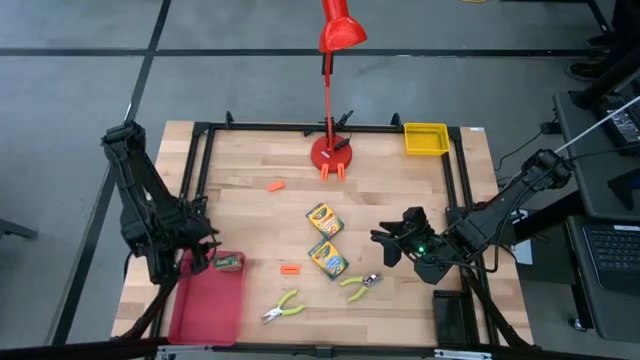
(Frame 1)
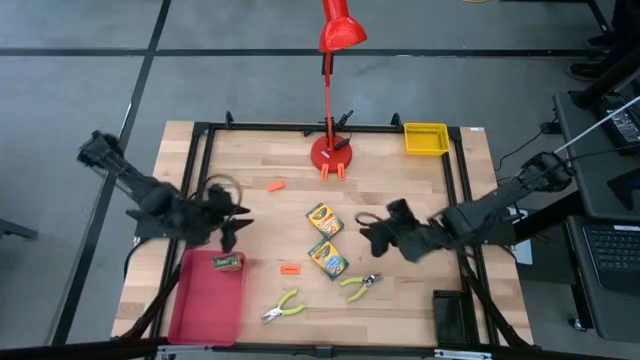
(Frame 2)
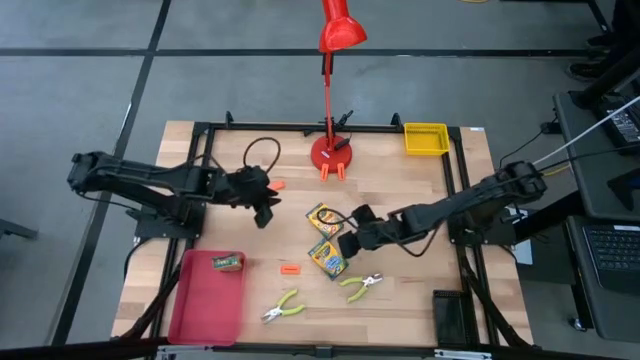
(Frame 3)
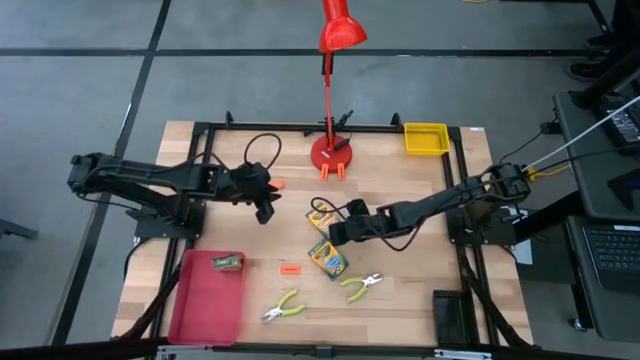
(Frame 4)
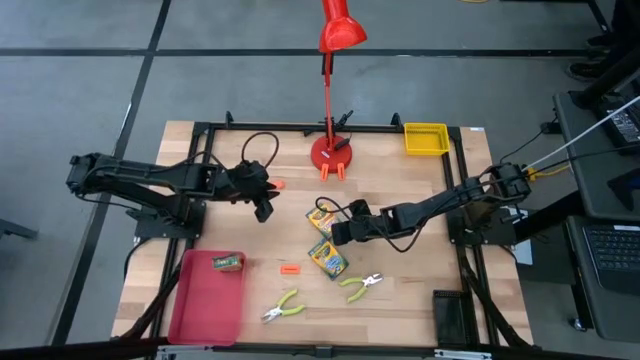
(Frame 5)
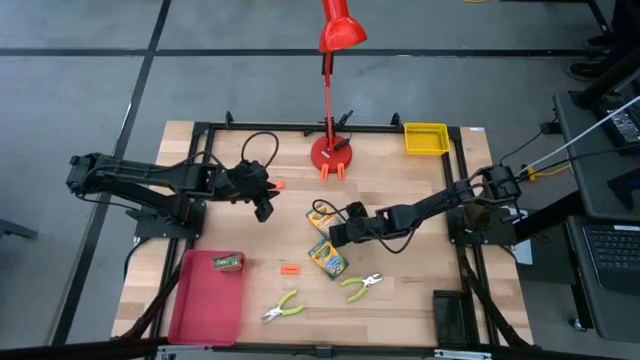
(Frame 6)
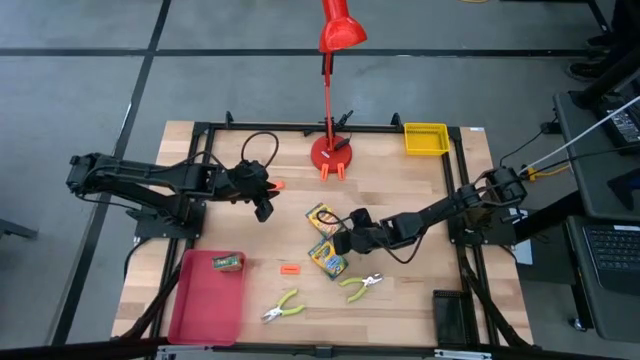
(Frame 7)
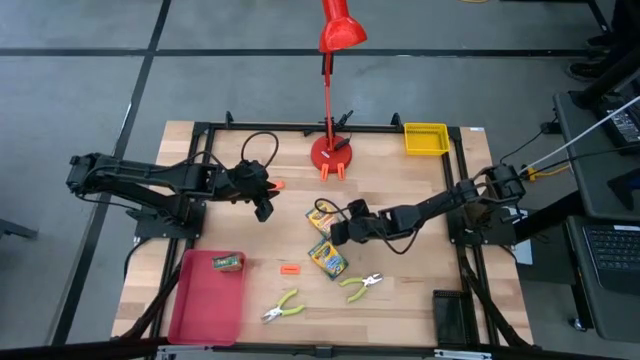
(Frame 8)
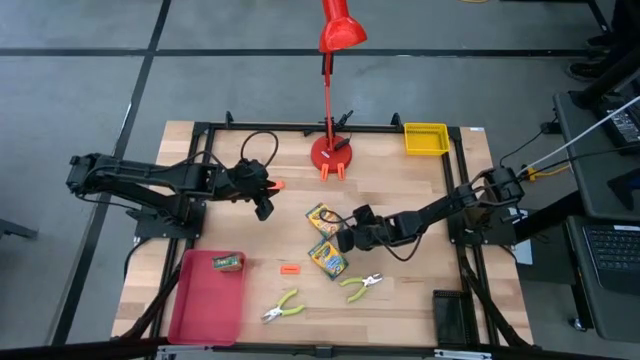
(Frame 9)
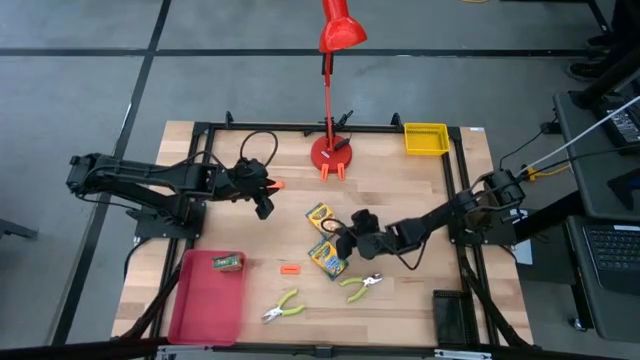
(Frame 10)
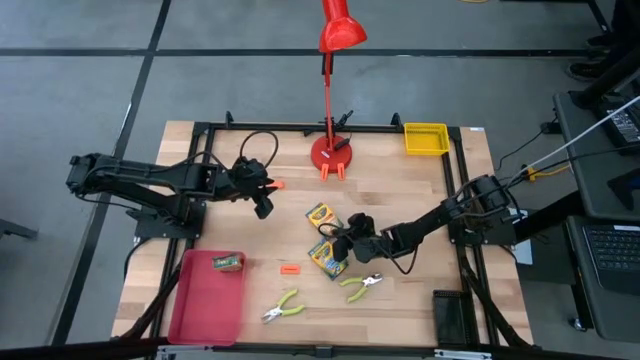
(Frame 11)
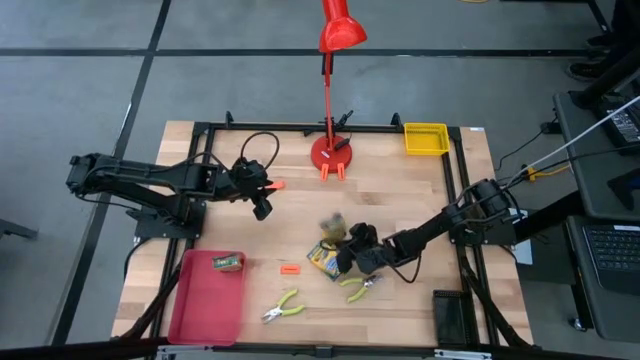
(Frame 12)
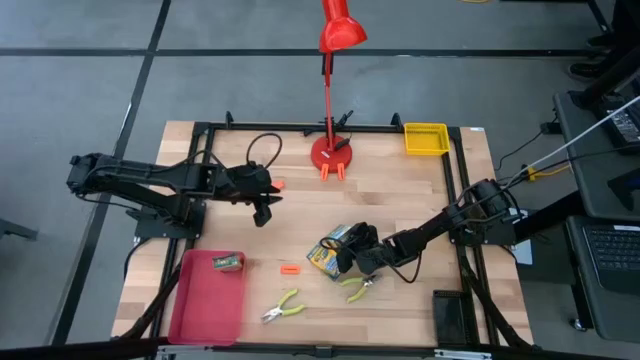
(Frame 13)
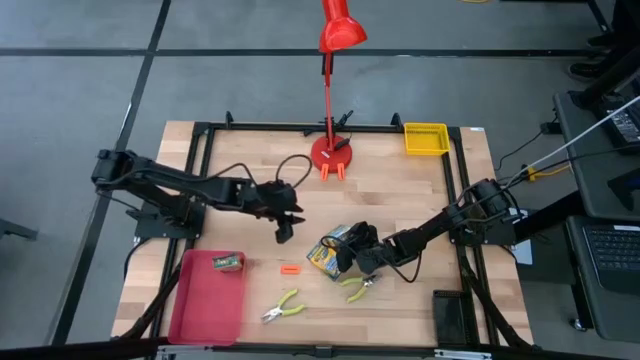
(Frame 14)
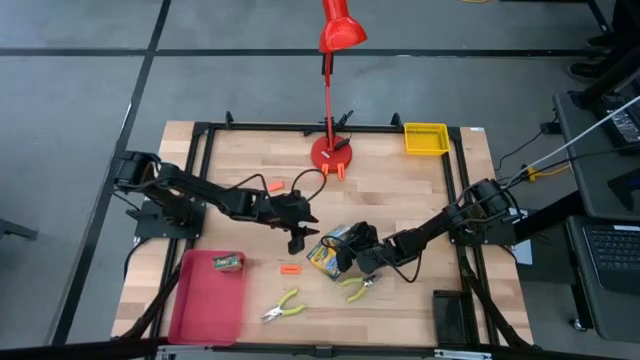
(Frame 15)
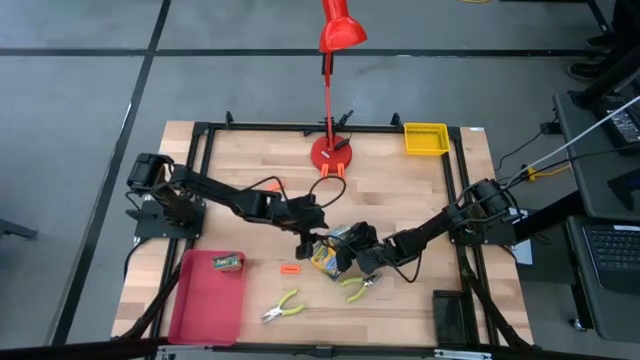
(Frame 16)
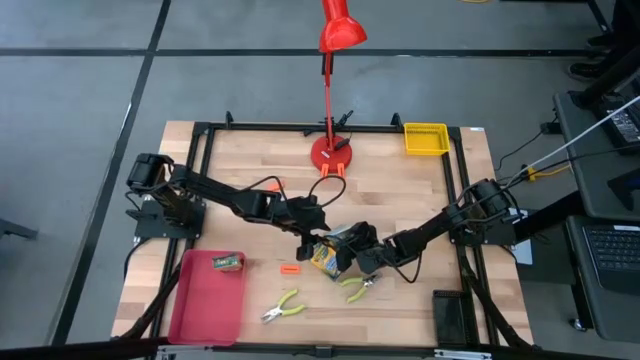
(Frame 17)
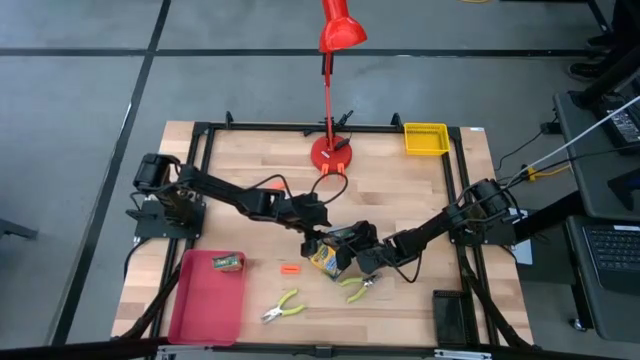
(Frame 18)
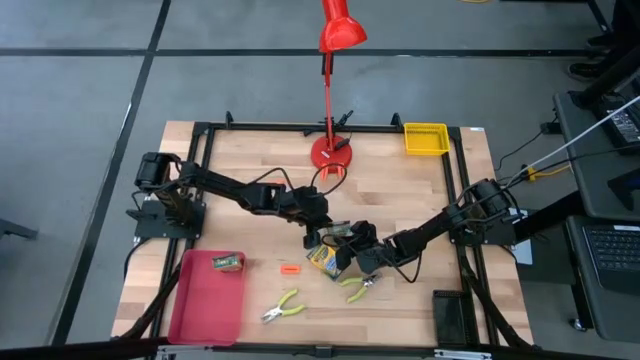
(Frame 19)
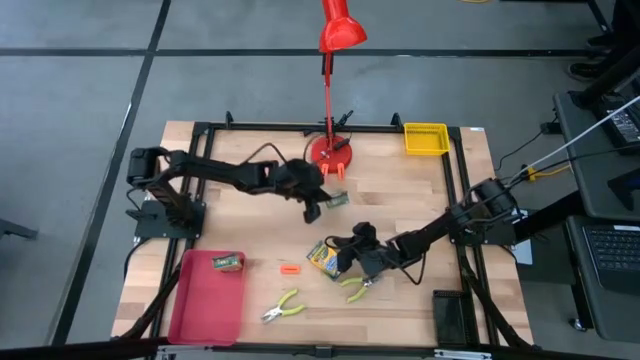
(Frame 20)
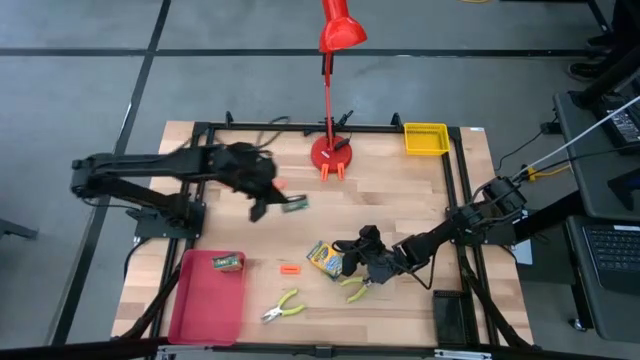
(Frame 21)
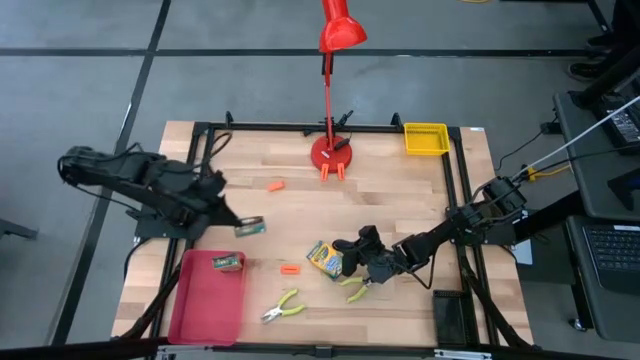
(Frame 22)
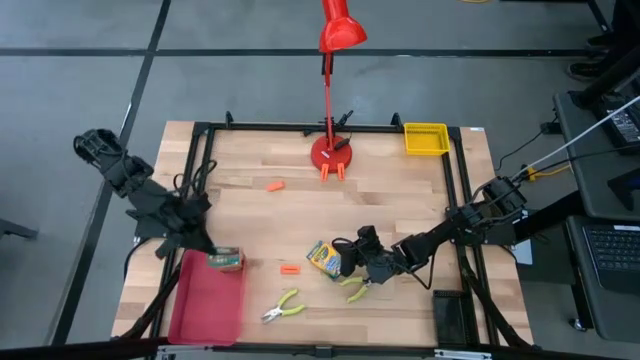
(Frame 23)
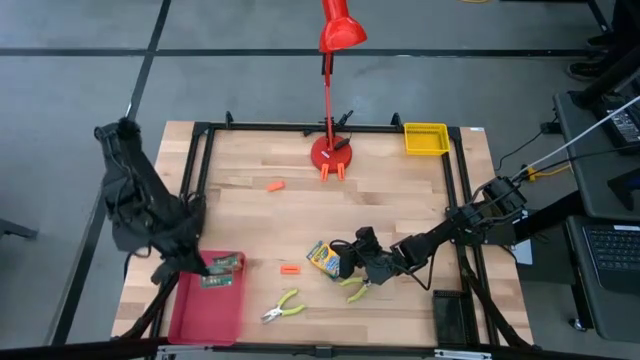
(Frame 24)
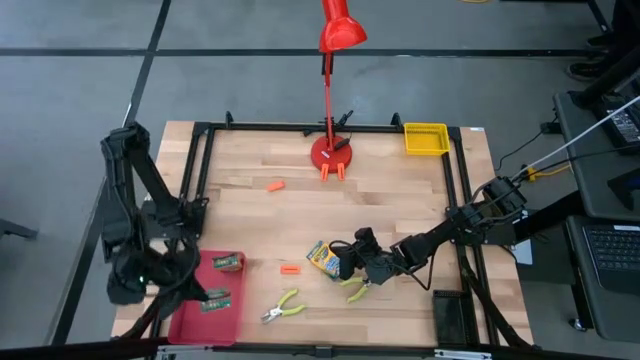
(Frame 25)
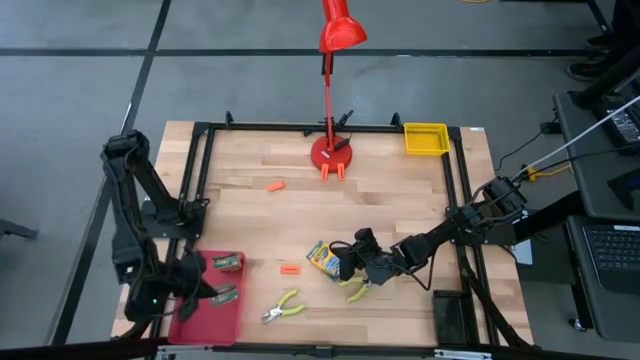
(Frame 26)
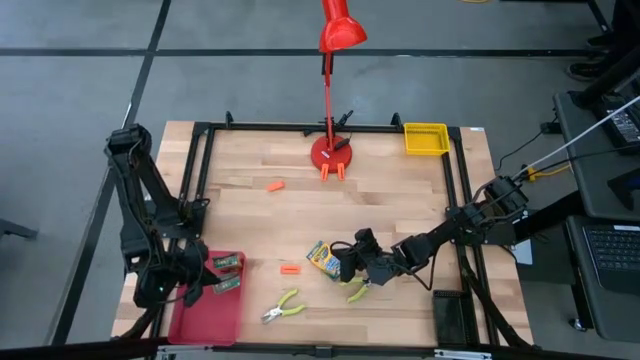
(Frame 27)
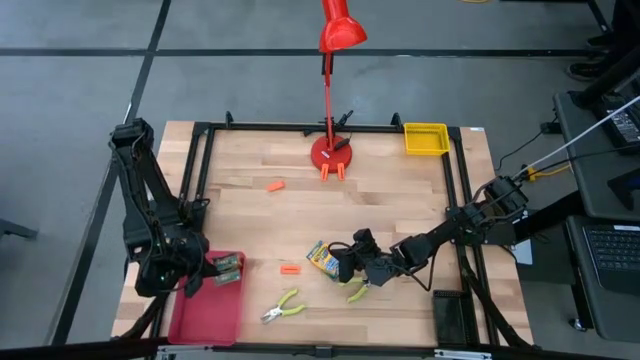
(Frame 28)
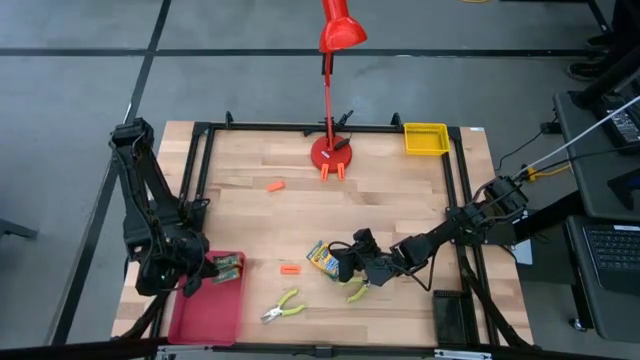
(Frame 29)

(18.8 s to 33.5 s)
Task: Pick & Place School Supplies
Put the yellow crayon box into the red bin
